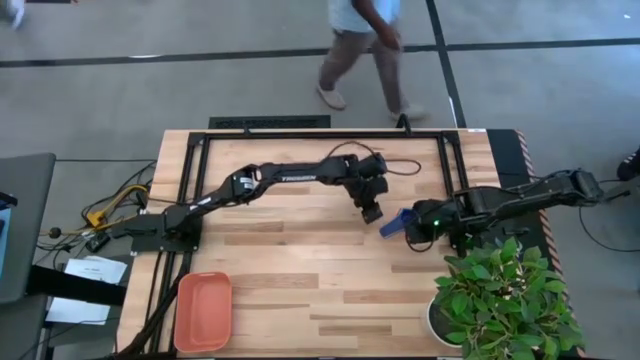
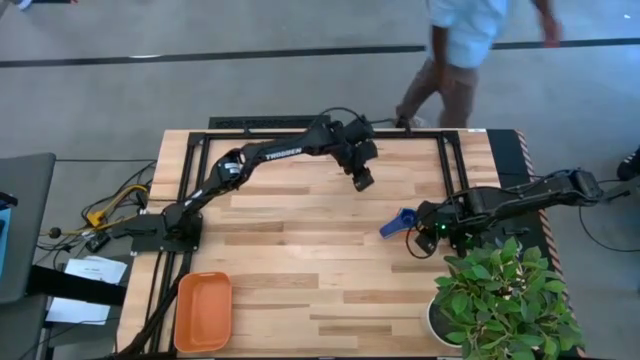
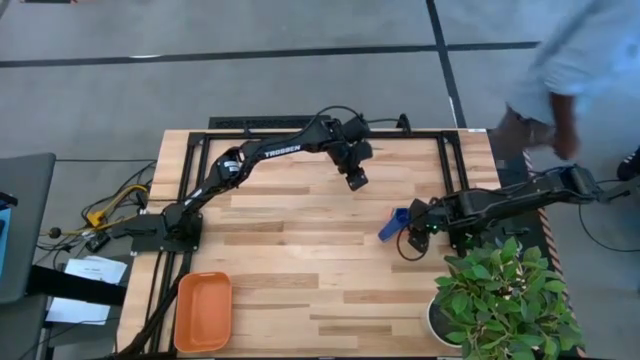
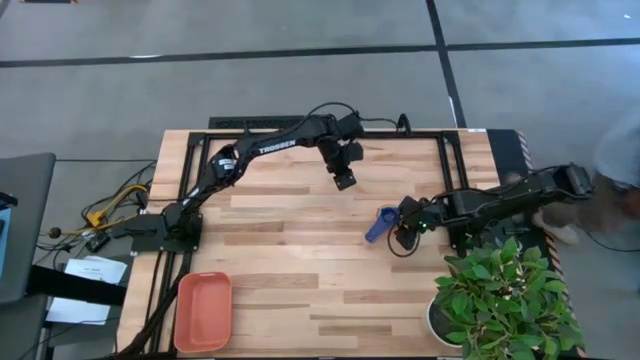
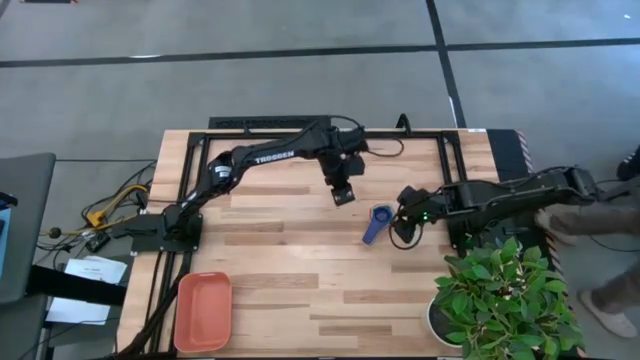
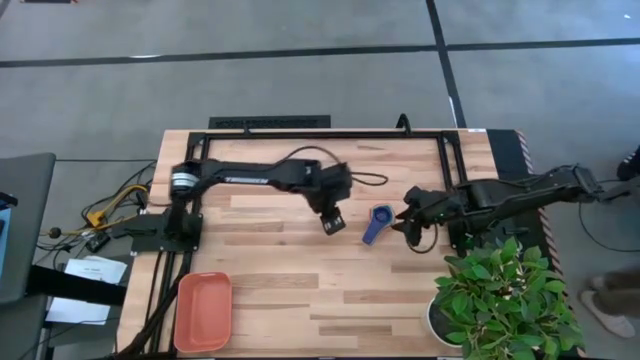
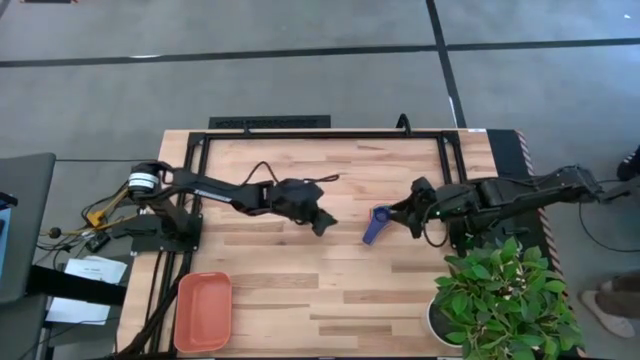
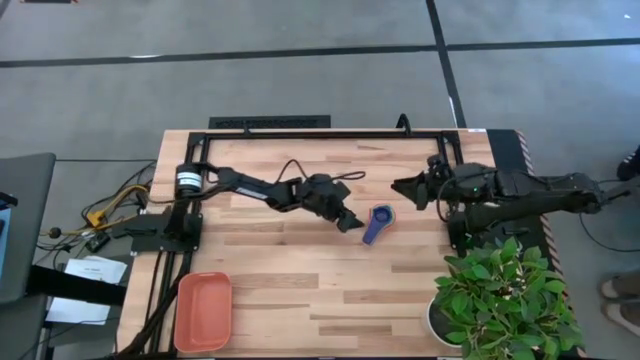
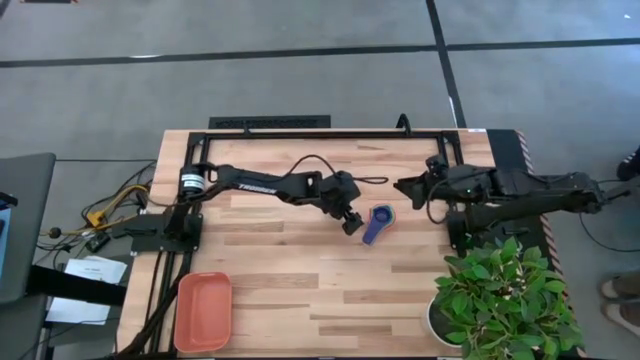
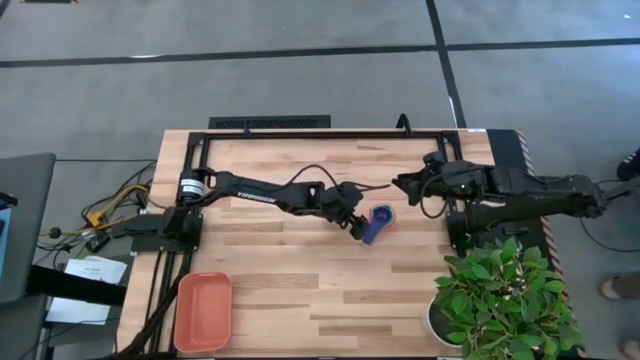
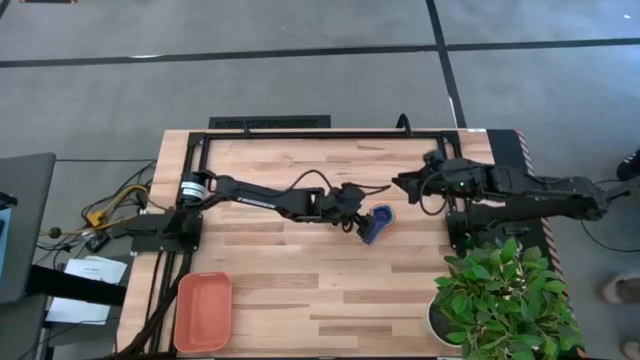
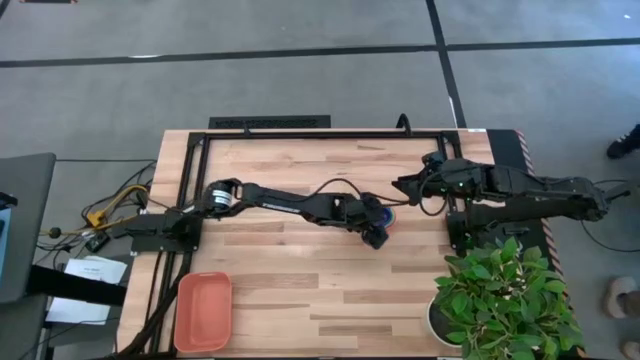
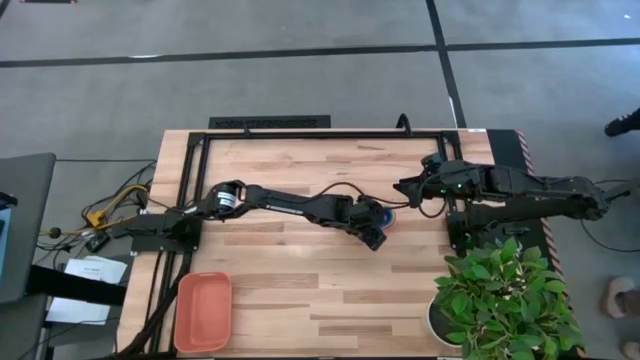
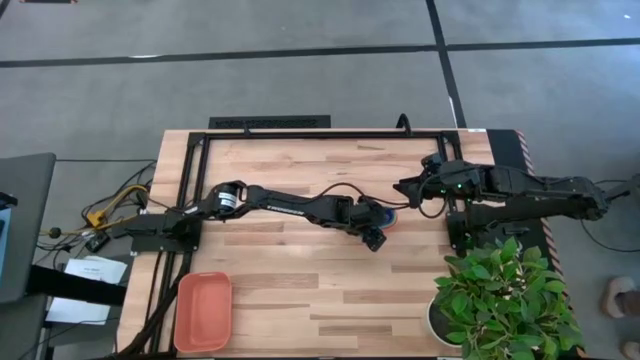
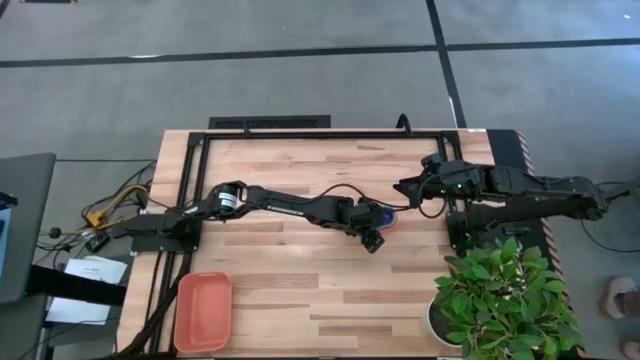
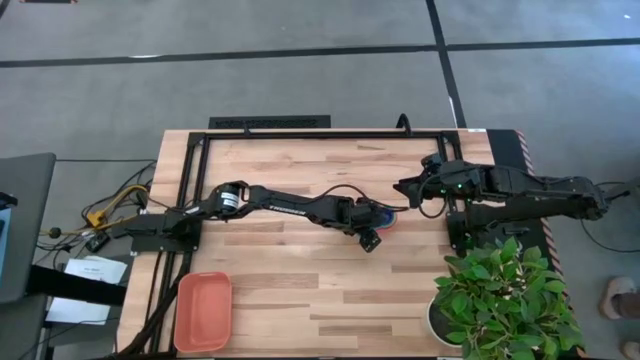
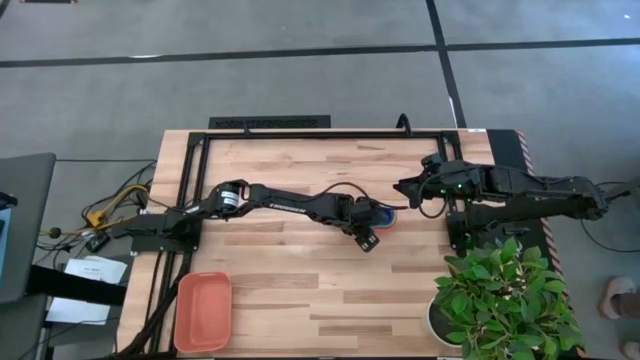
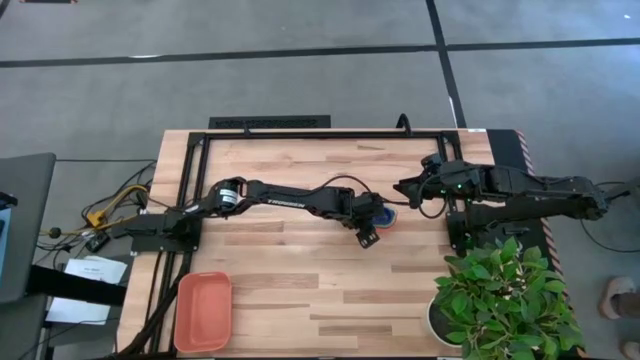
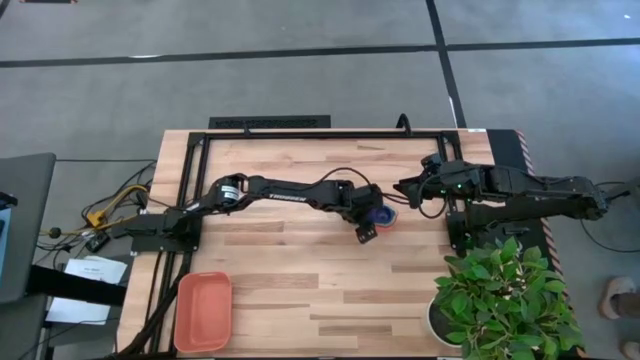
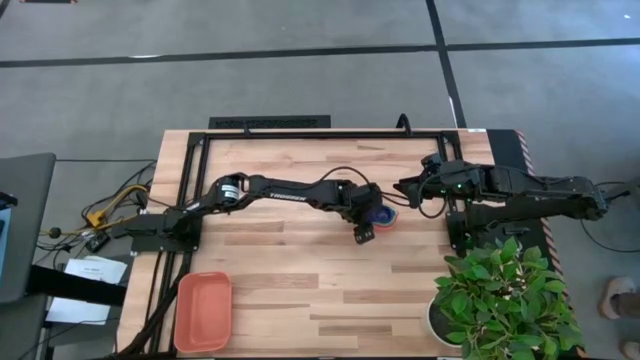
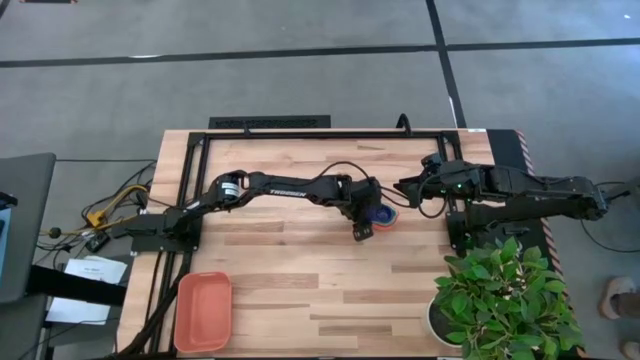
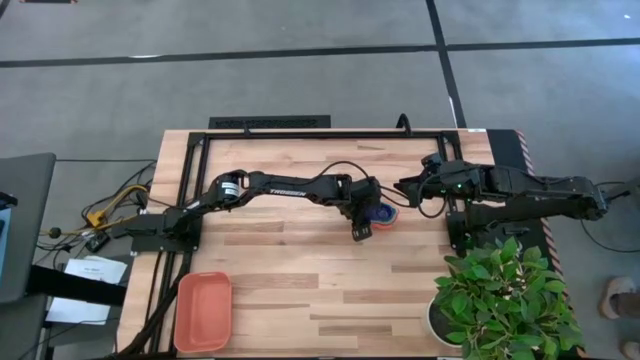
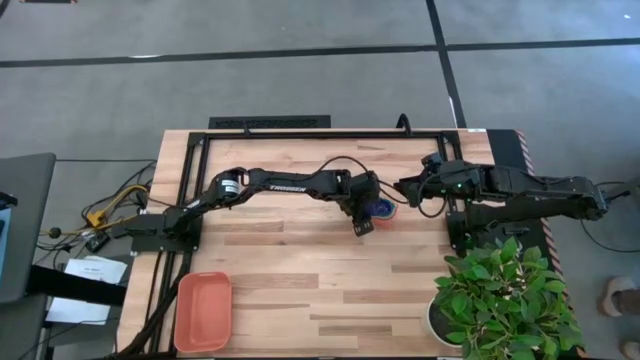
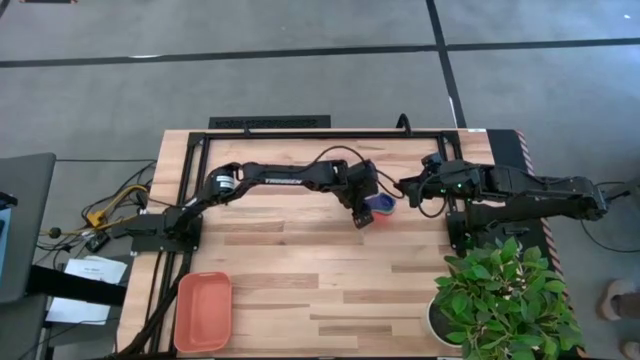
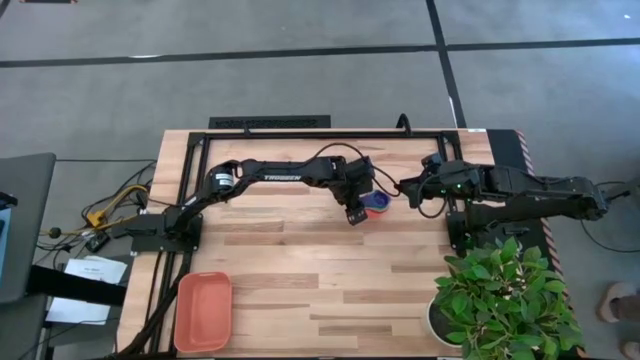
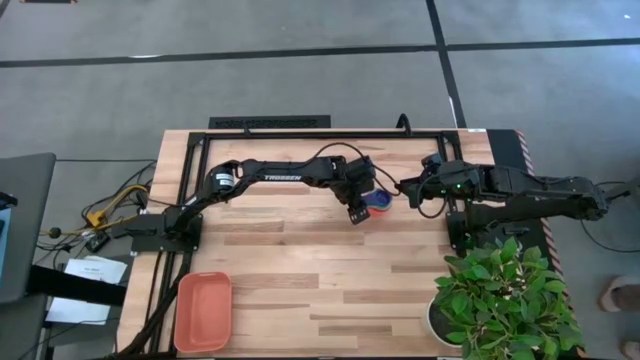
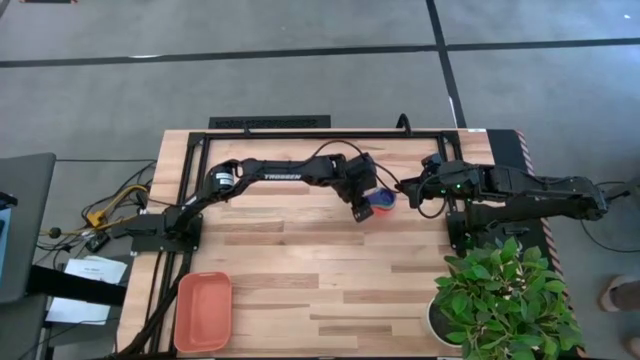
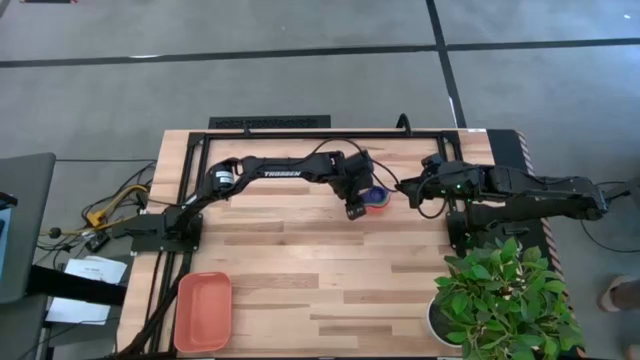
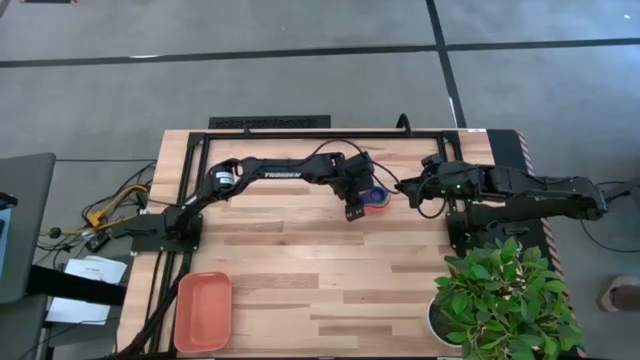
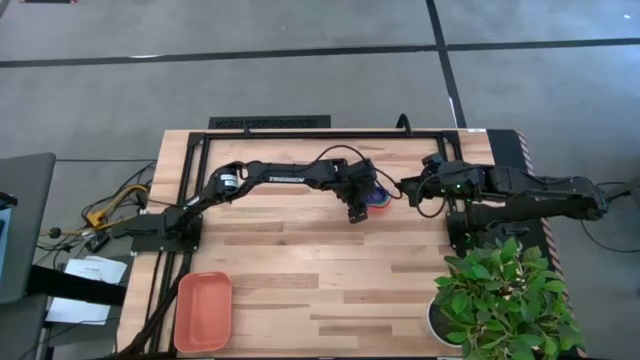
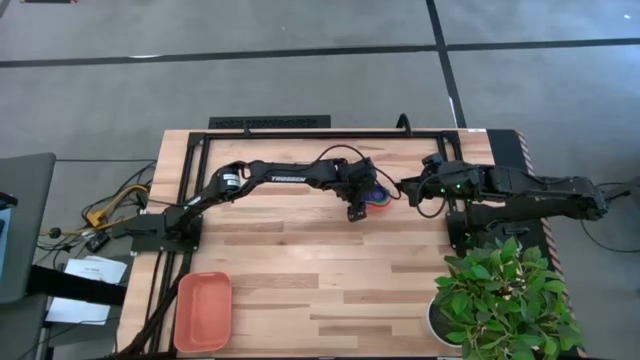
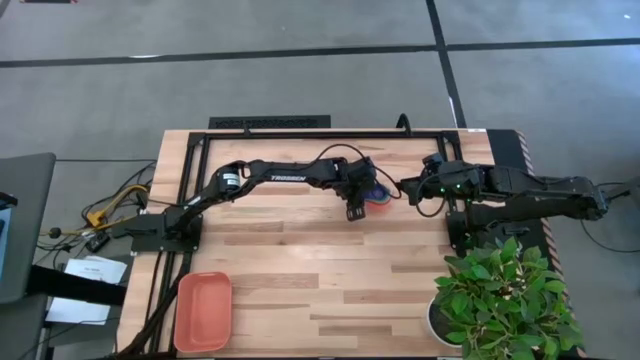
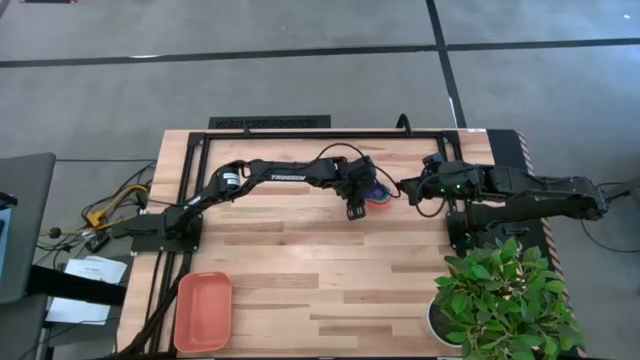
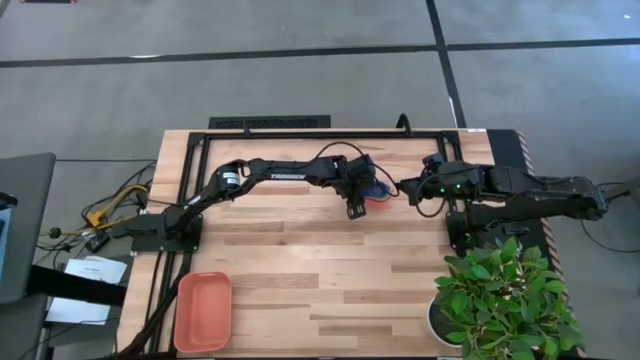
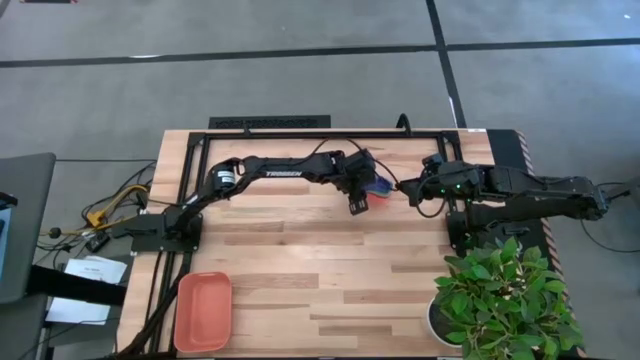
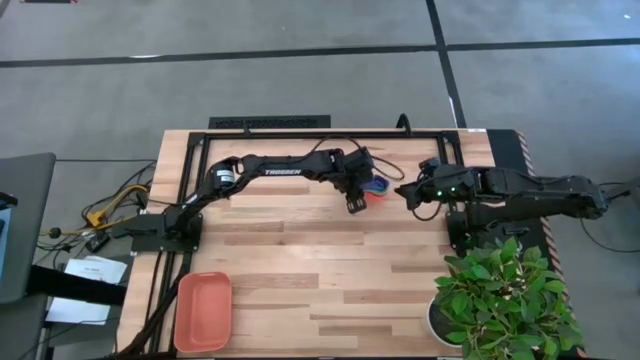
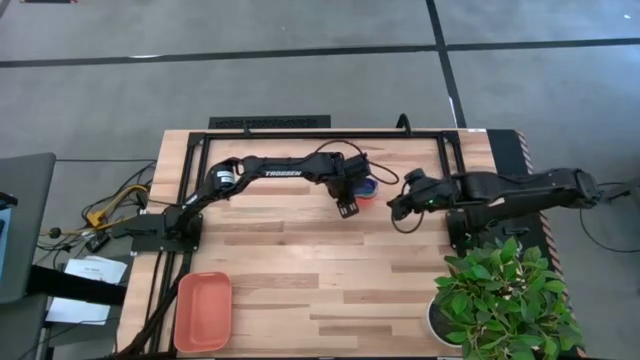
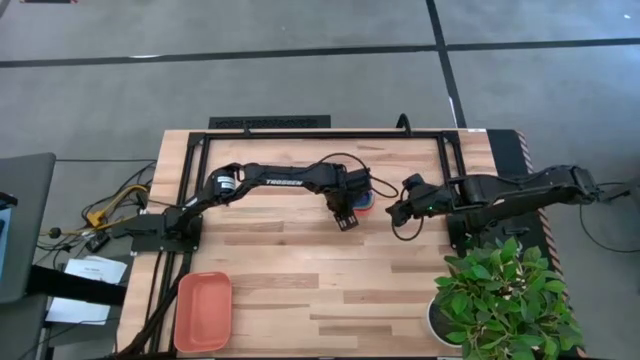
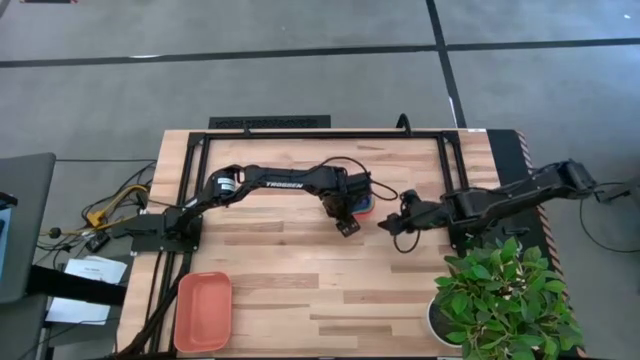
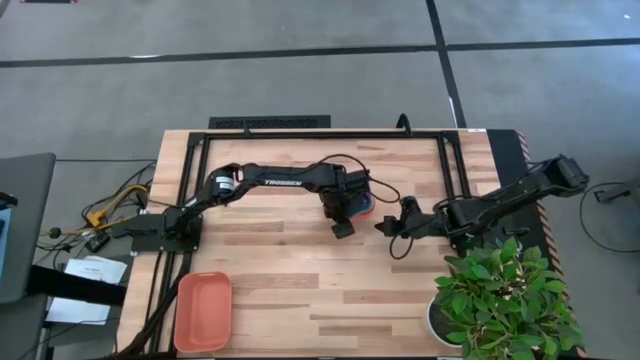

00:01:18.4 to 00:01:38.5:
Task: Nest measuring cups in basket
Put the stacked colored measuring cups into the orange bin
